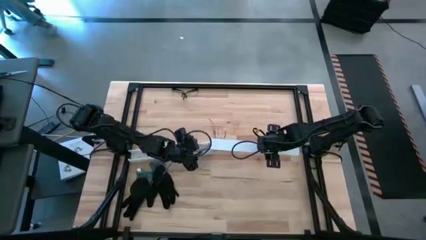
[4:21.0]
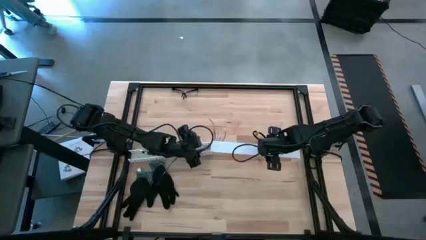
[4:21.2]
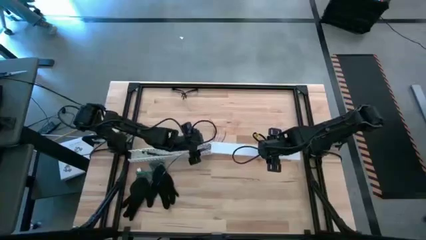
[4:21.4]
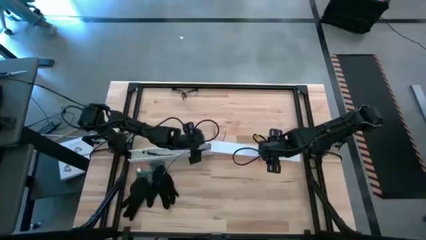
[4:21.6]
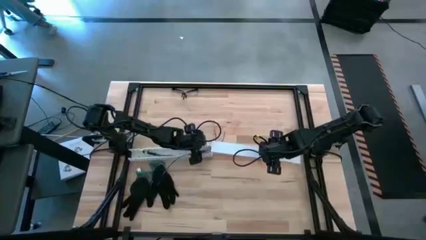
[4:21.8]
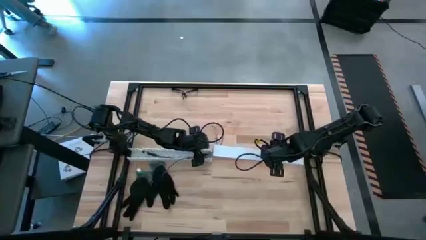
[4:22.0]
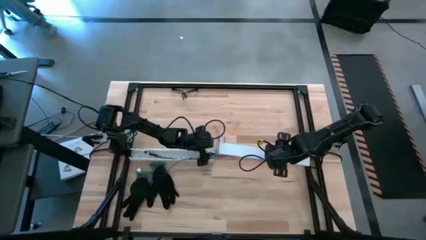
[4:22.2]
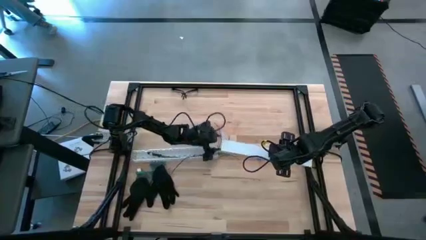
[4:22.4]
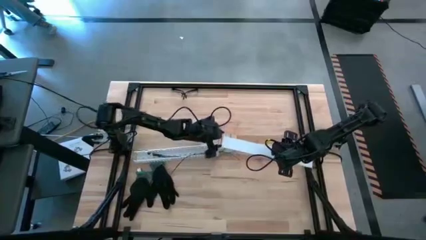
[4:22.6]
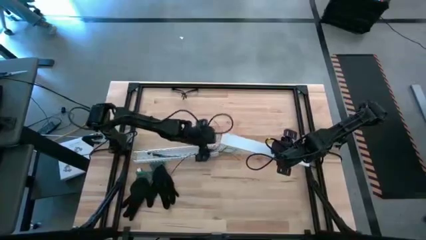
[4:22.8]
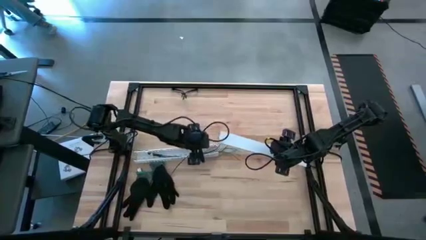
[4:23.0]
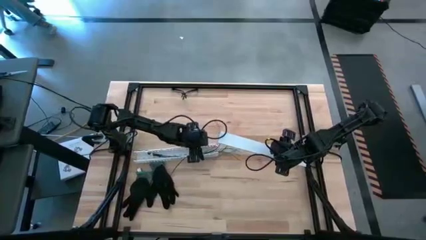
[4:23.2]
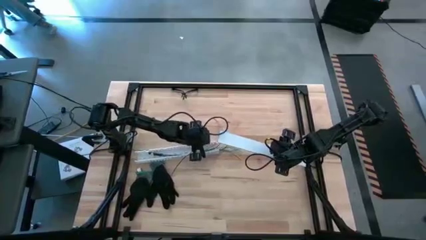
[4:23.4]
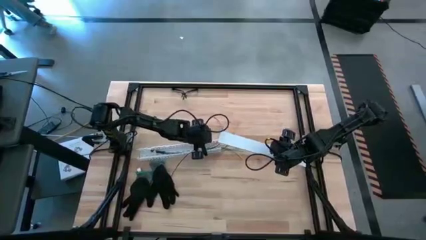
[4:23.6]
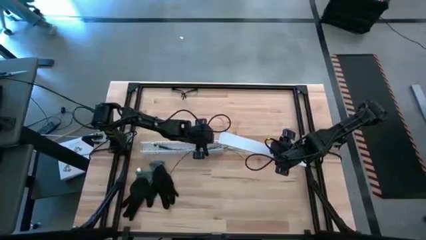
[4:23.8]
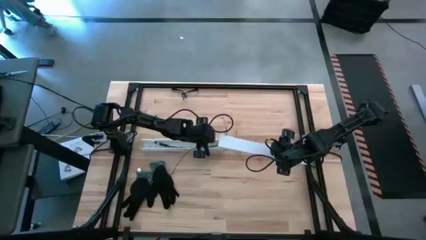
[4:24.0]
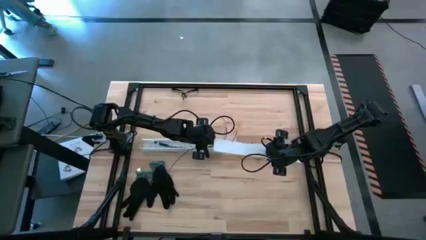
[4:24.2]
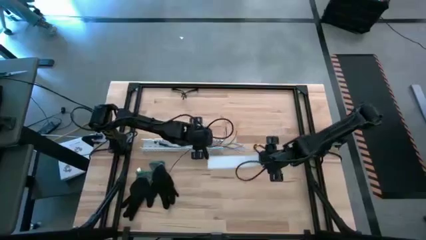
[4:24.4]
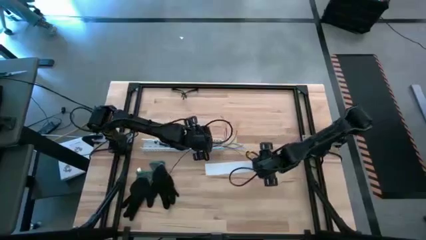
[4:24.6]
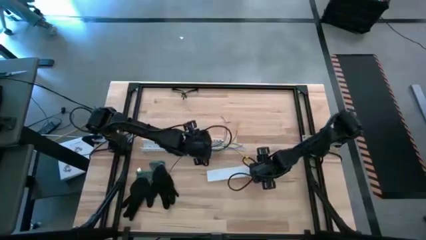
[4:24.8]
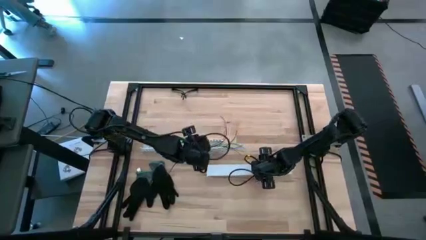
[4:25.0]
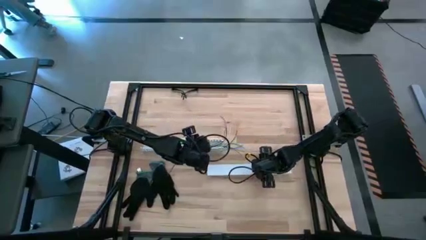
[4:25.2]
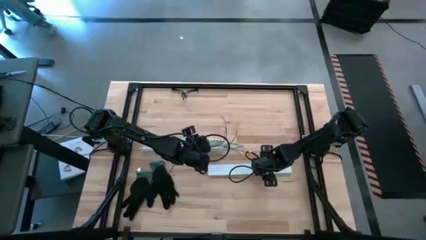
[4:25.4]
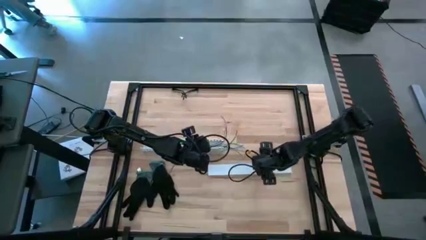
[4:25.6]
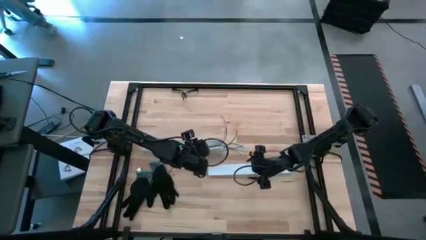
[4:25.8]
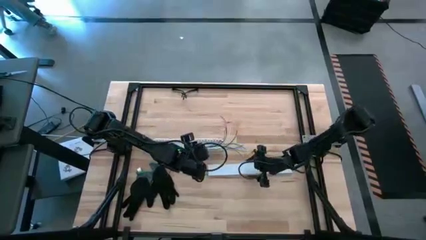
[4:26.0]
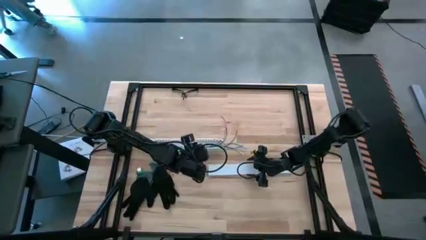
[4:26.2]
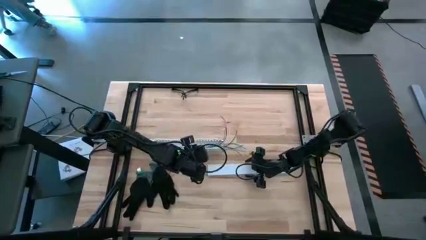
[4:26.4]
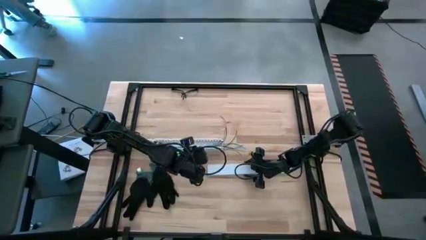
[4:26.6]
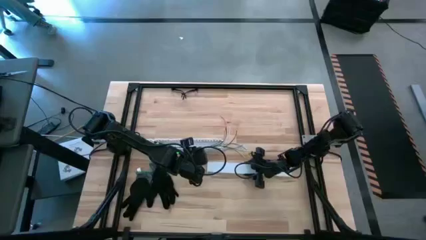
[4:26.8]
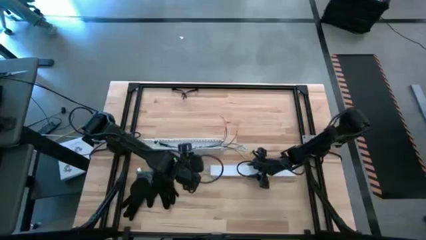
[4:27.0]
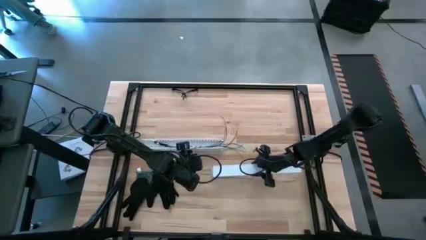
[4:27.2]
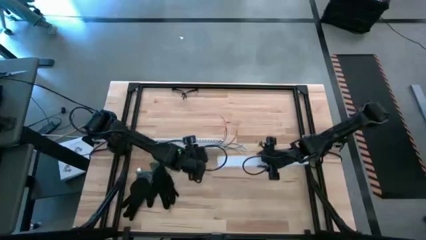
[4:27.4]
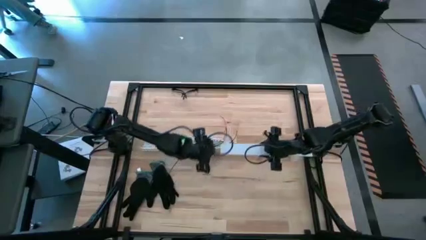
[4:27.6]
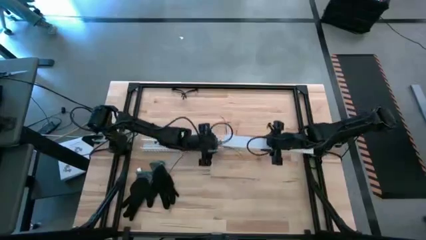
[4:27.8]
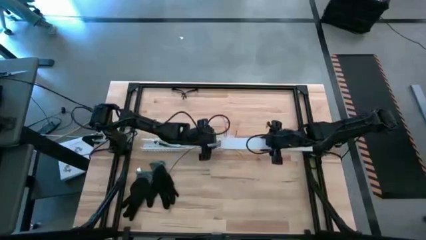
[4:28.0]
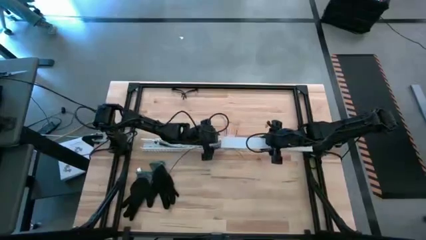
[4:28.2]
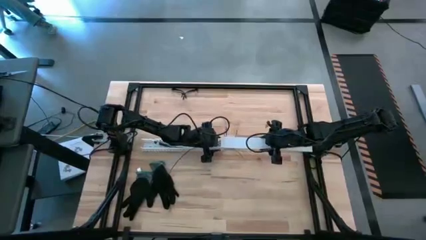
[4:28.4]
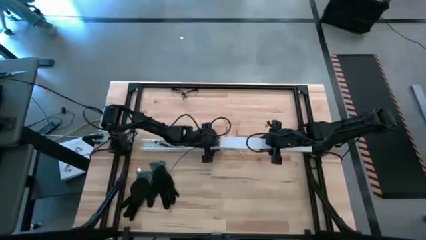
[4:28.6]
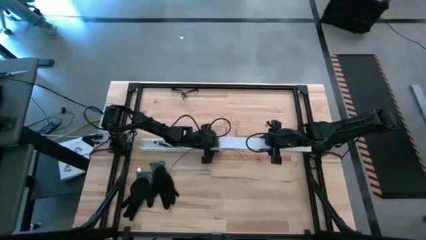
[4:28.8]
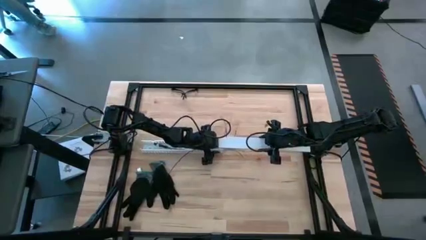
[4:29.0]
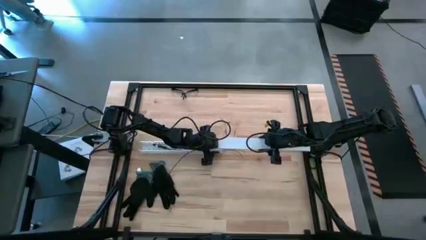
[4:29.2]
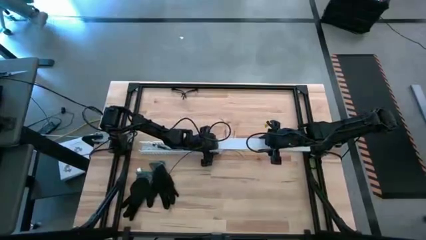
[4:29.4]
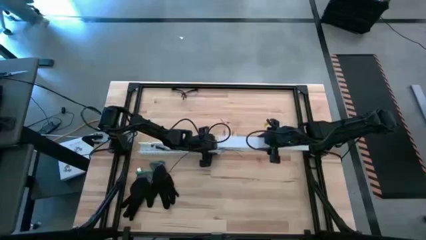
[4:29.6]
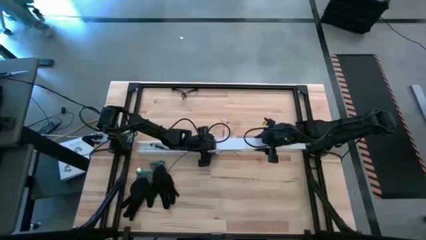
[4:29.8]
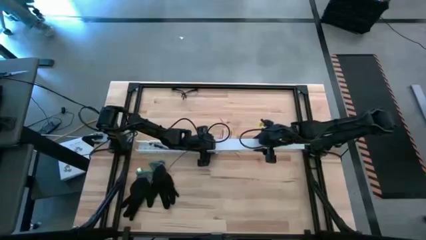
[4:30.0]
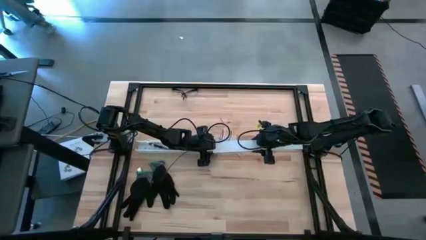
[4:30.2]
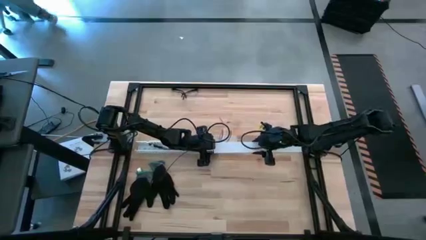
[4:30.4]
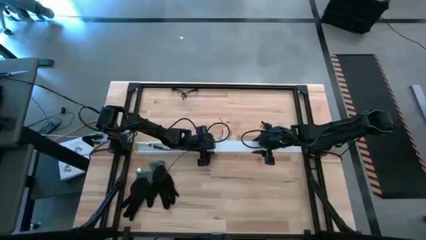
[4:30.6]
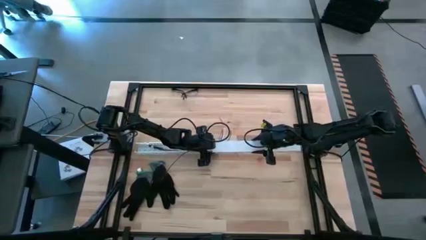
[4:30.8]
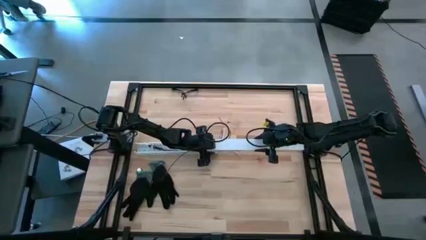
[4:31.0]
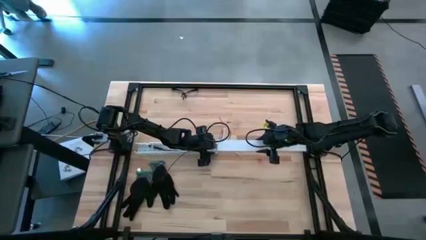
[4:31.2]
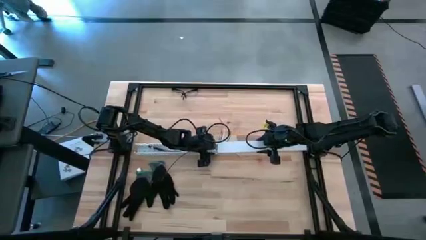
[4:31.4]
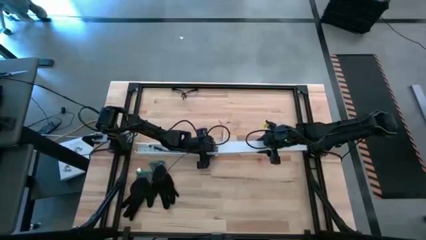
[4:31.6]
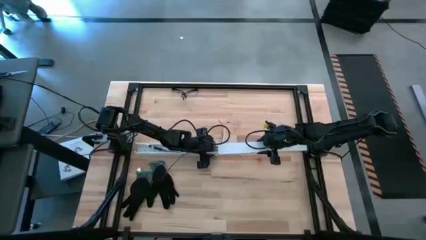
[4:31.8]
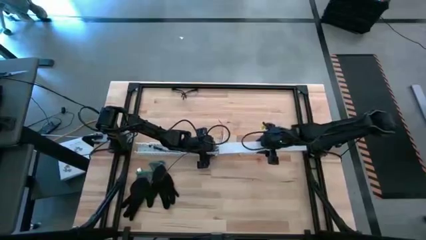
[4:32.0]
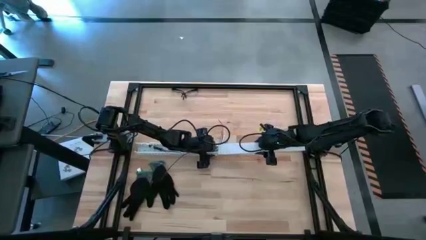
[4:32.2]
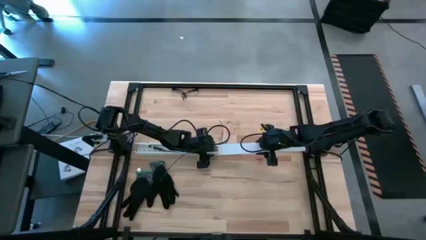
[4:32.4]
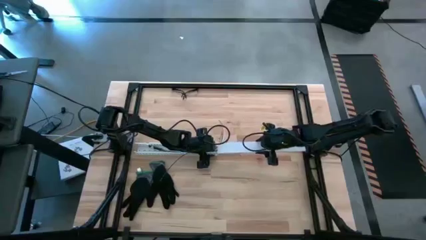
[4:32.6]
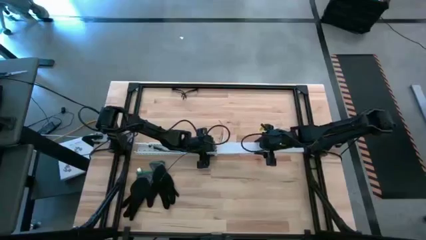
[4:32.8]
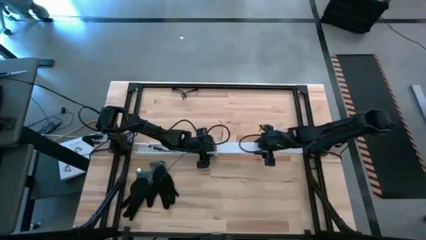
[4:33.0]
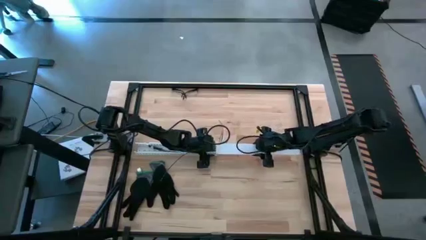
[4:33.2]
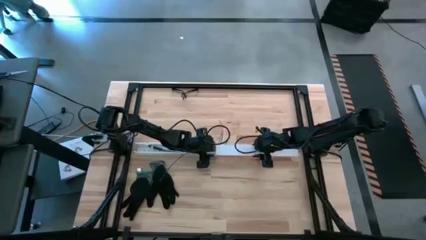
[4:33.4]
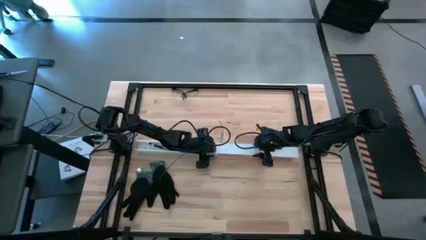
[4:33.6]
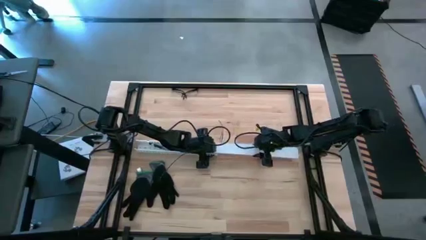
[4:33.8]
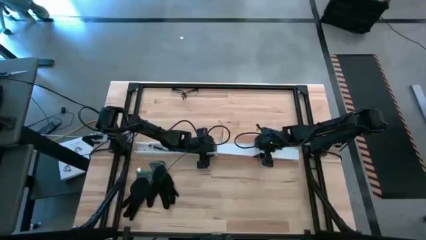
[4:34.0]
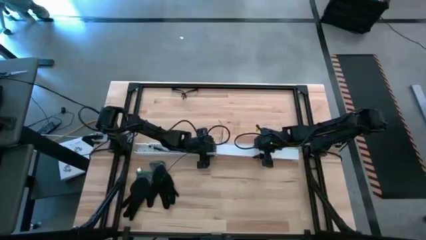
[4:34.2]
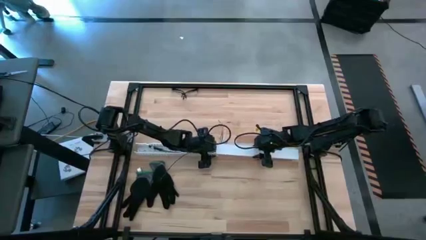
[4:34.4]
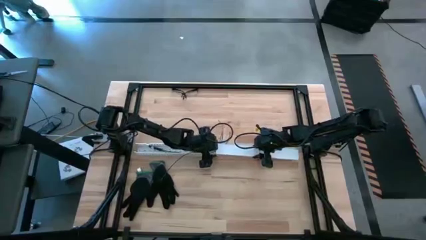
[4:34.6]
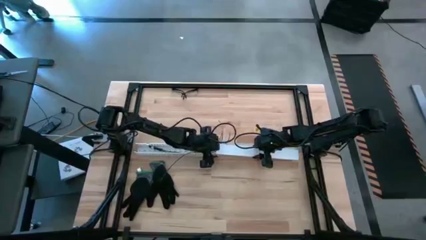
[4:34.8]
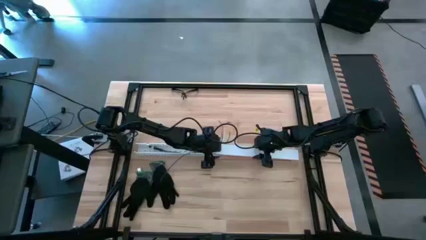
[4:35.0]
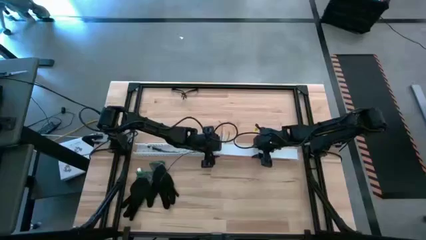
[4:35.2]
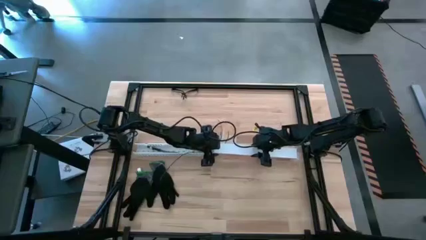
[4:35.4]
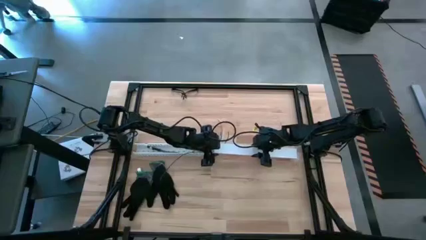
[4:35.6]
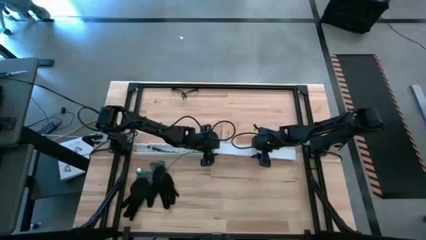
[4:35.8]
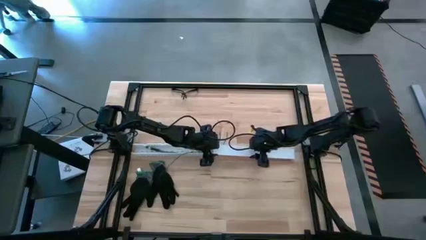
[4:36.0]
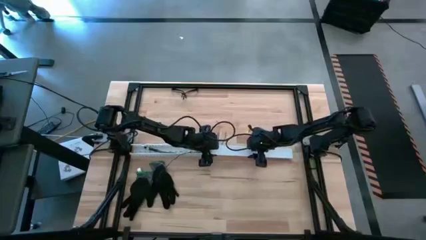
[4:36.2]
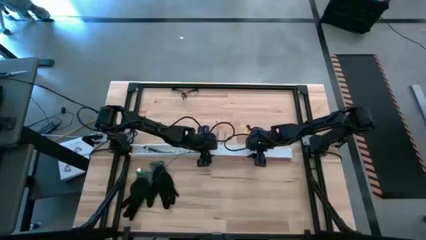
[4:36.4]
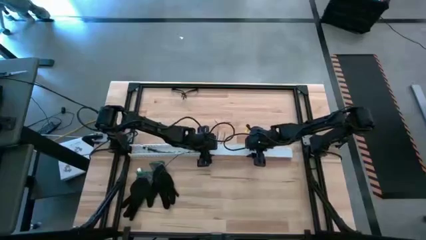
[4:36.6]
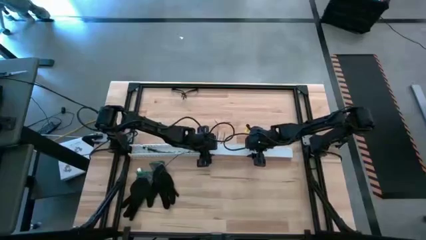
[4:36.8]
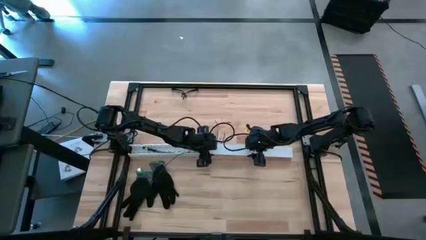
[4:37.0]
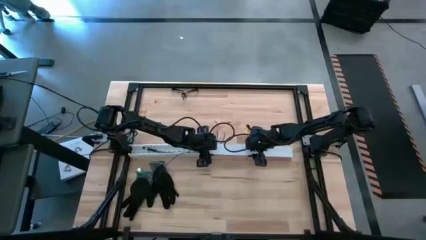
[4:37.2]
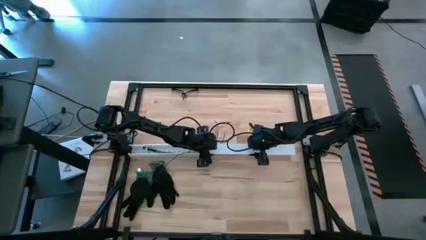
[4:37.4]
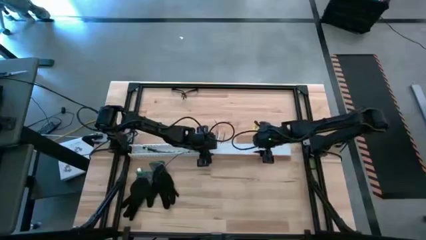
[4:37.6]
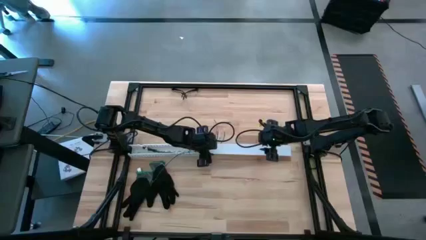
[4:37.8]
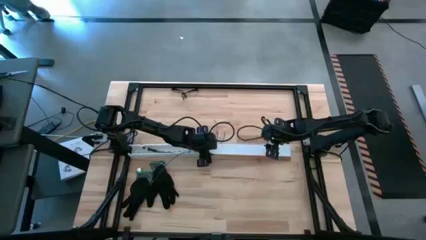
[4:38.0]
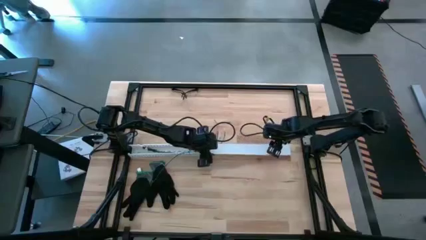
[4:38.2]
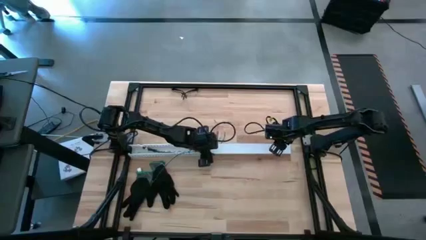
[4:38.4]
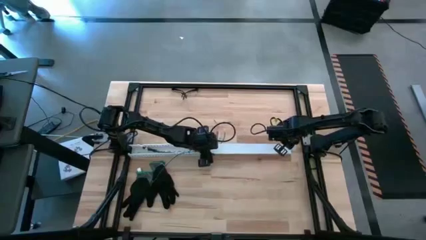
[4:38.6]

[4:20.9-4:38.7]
Task: Ziptie cables
Close the white cable duct
